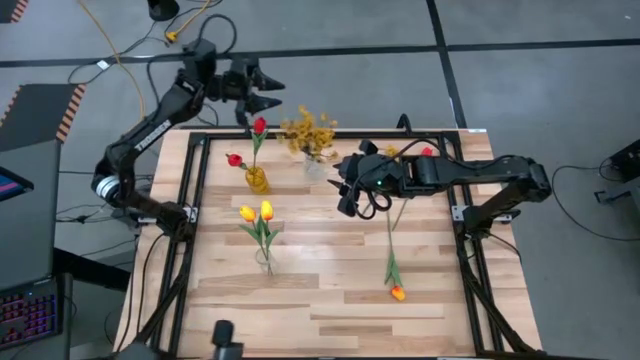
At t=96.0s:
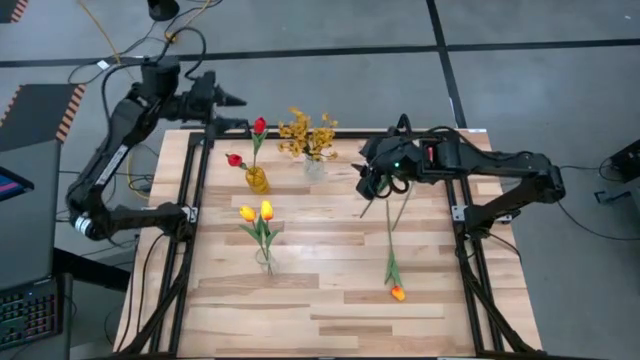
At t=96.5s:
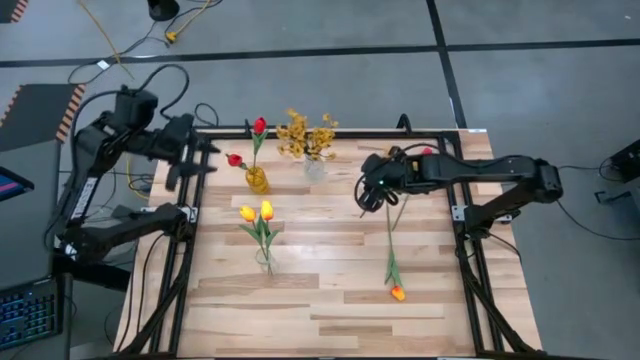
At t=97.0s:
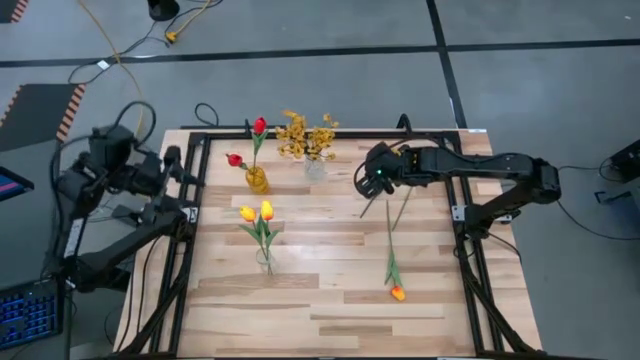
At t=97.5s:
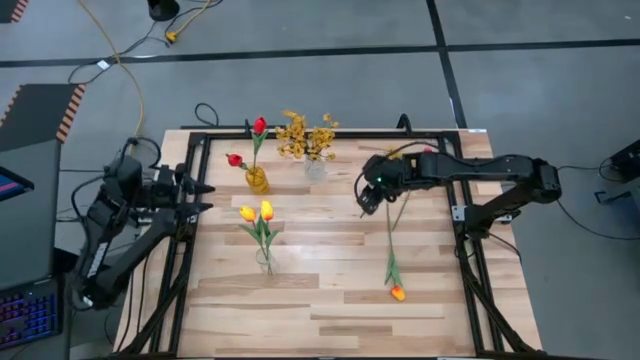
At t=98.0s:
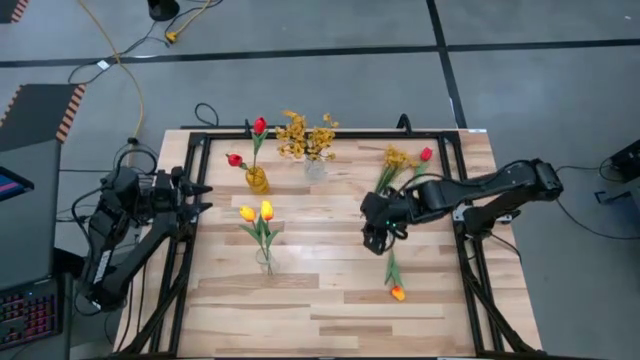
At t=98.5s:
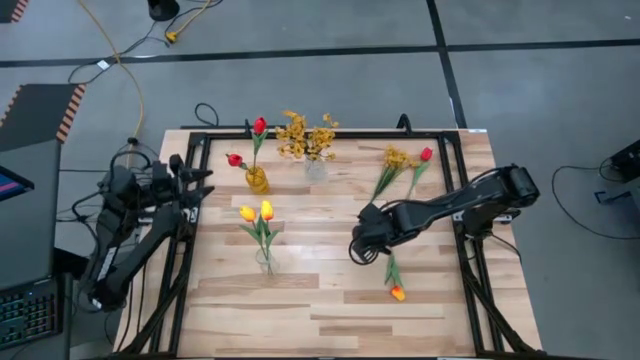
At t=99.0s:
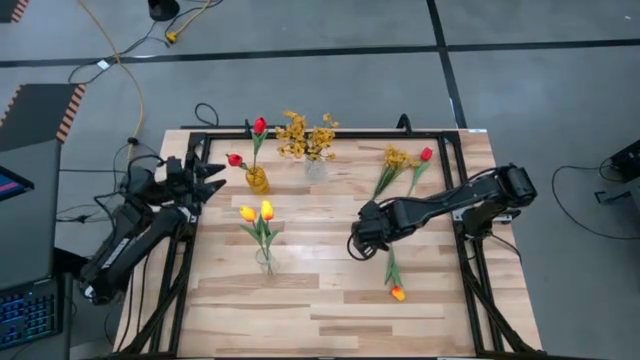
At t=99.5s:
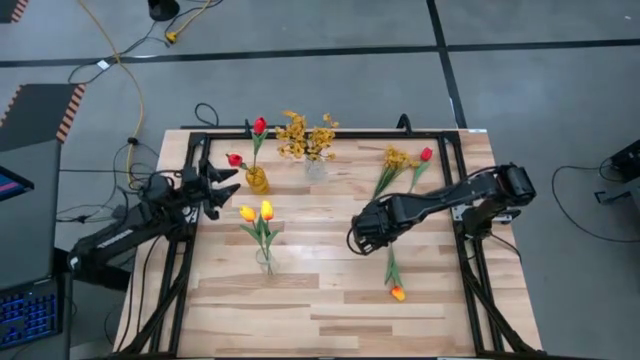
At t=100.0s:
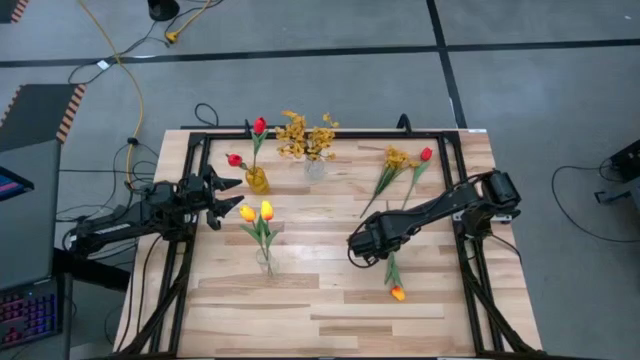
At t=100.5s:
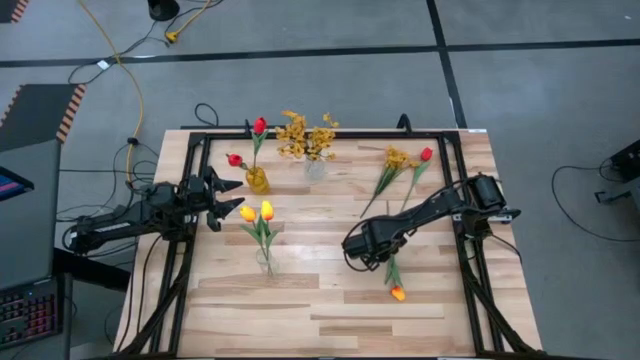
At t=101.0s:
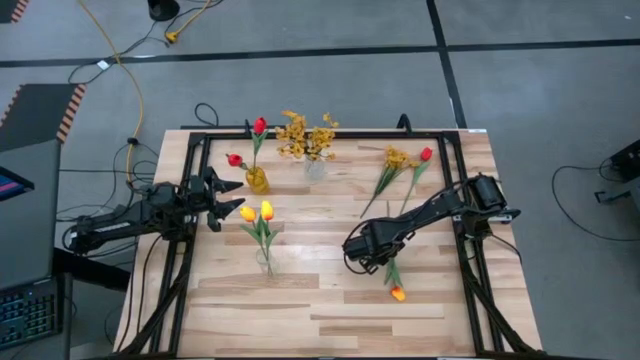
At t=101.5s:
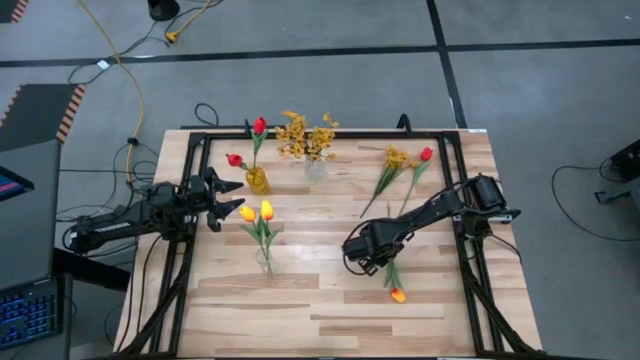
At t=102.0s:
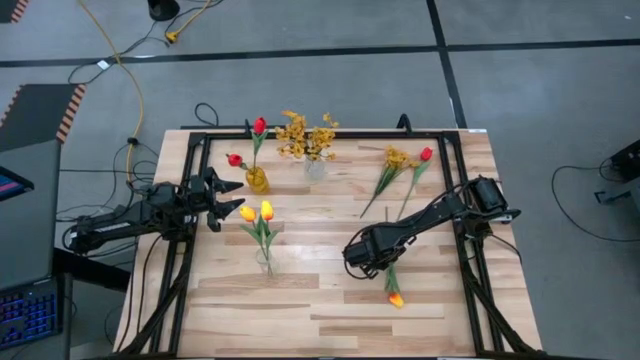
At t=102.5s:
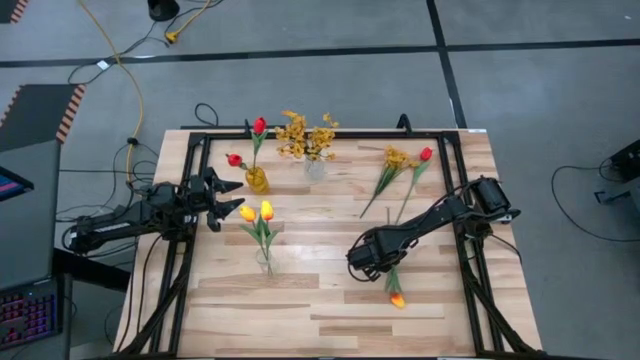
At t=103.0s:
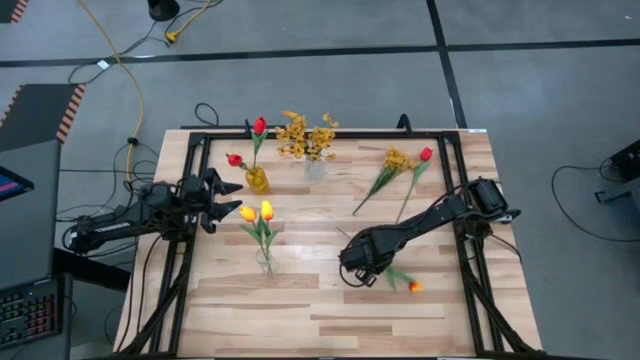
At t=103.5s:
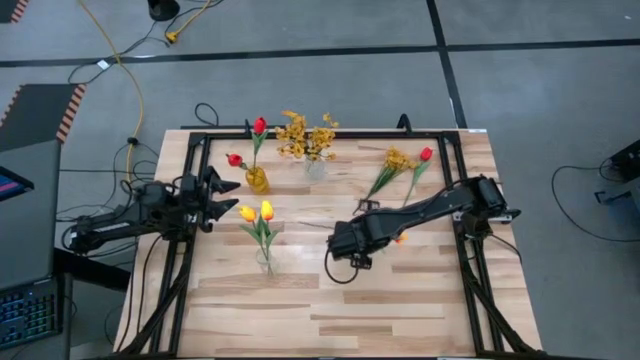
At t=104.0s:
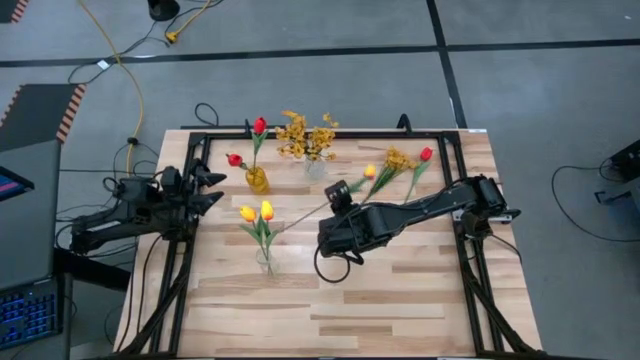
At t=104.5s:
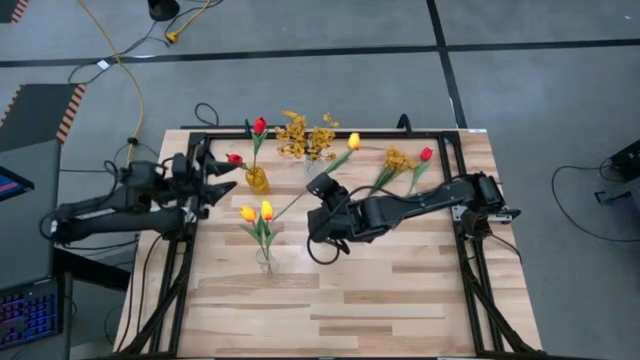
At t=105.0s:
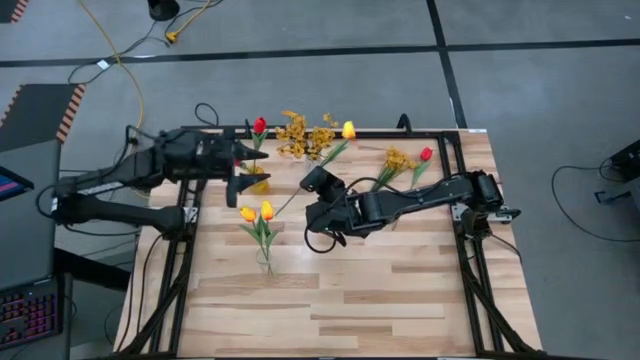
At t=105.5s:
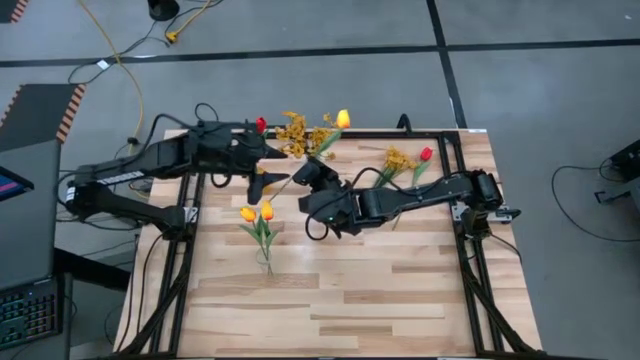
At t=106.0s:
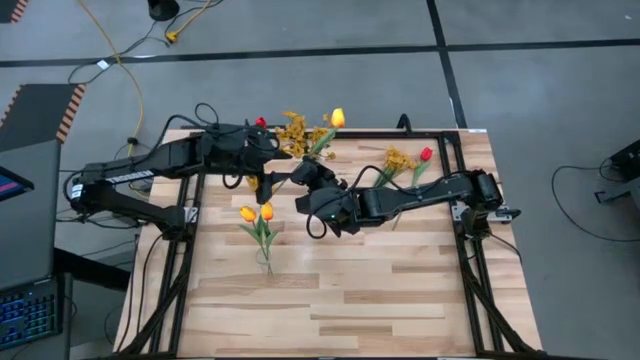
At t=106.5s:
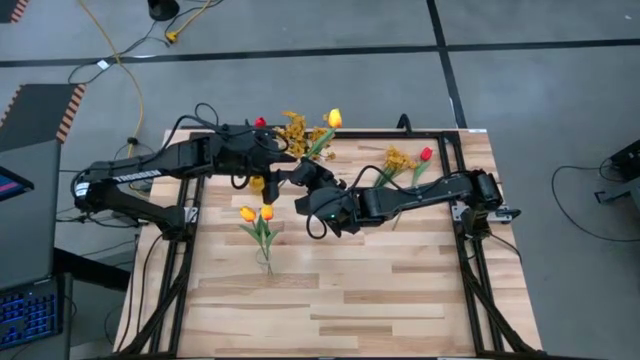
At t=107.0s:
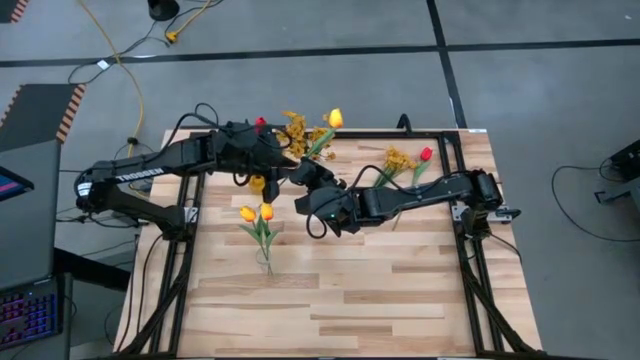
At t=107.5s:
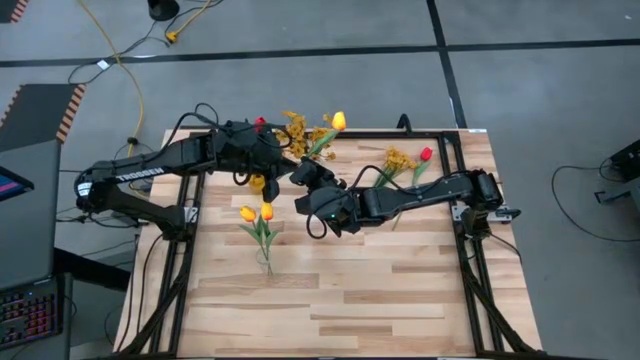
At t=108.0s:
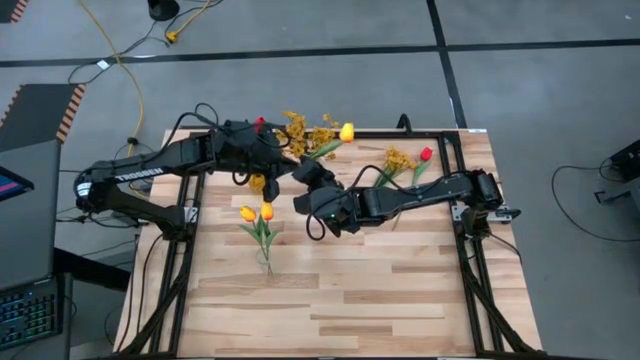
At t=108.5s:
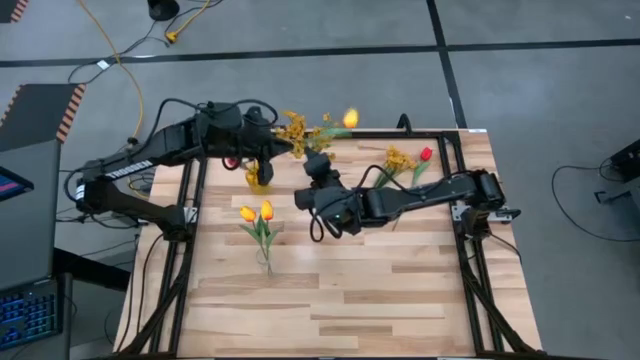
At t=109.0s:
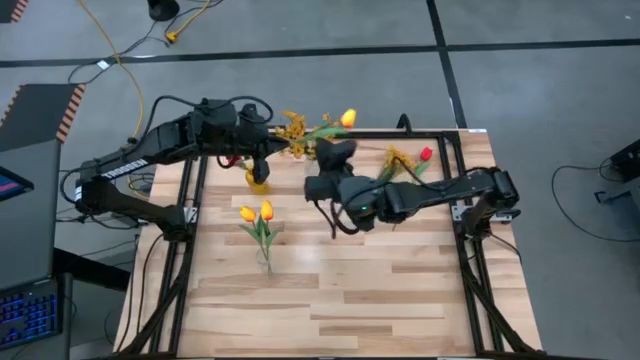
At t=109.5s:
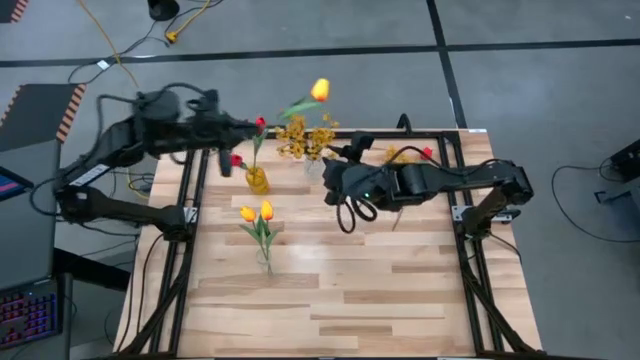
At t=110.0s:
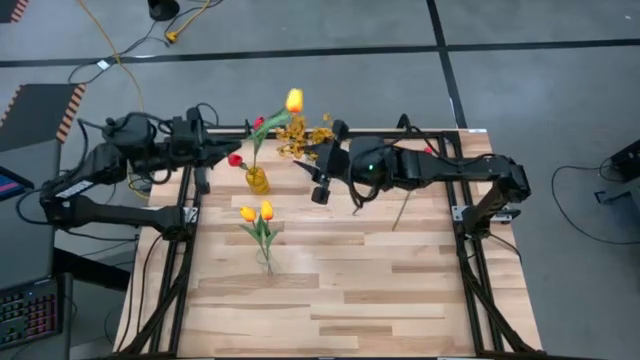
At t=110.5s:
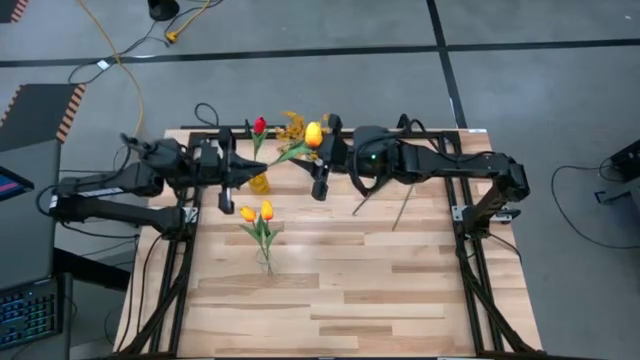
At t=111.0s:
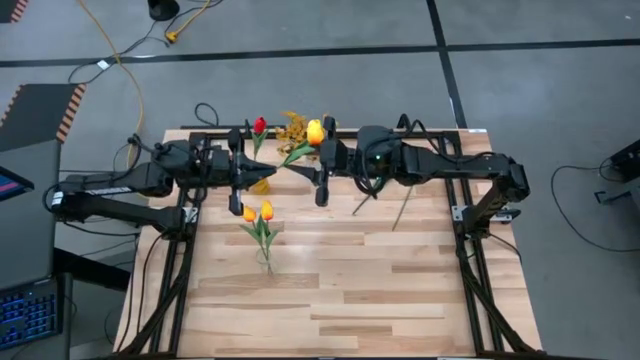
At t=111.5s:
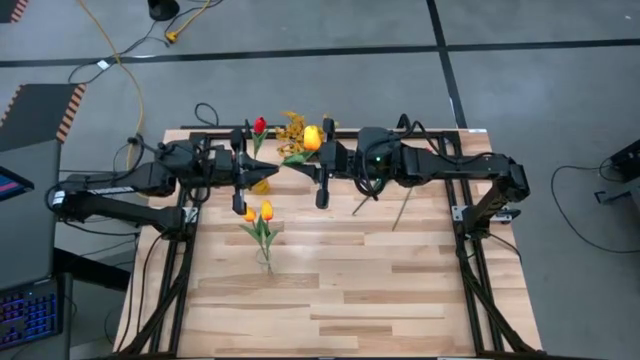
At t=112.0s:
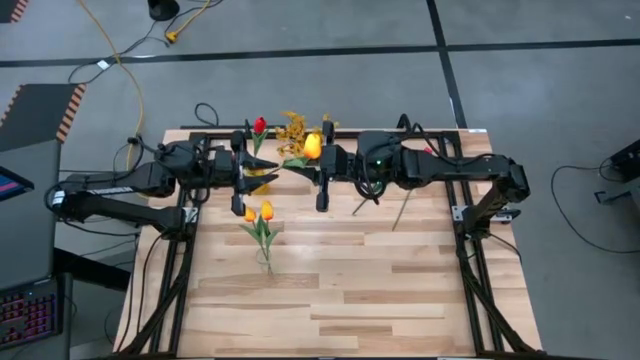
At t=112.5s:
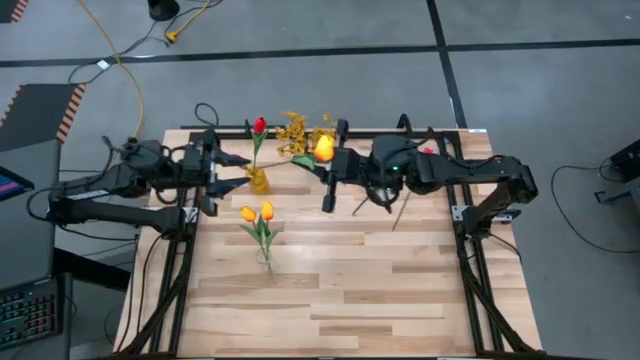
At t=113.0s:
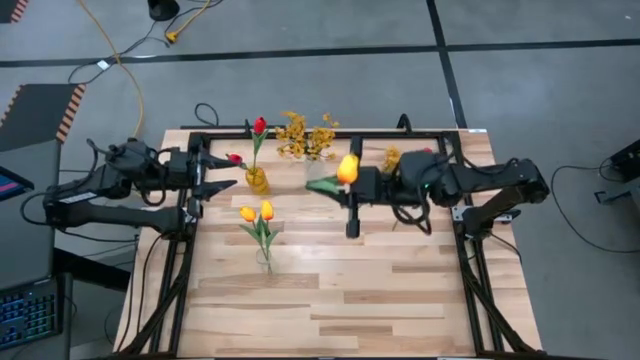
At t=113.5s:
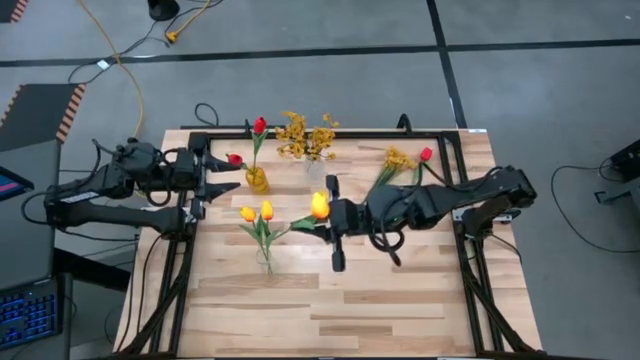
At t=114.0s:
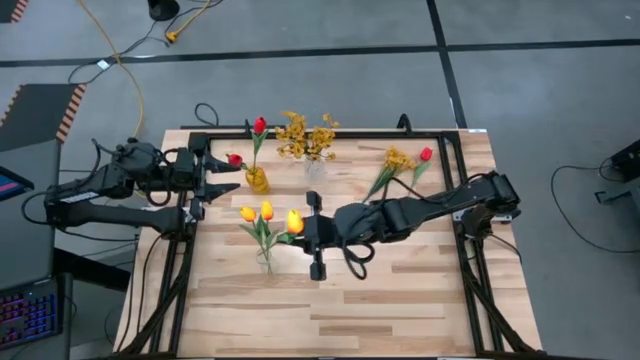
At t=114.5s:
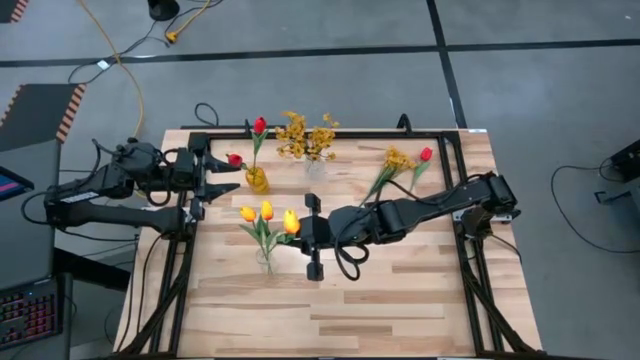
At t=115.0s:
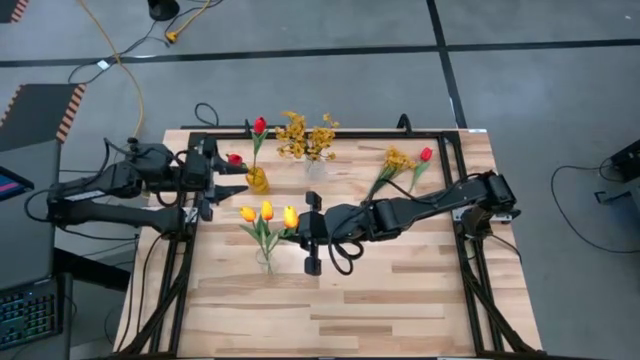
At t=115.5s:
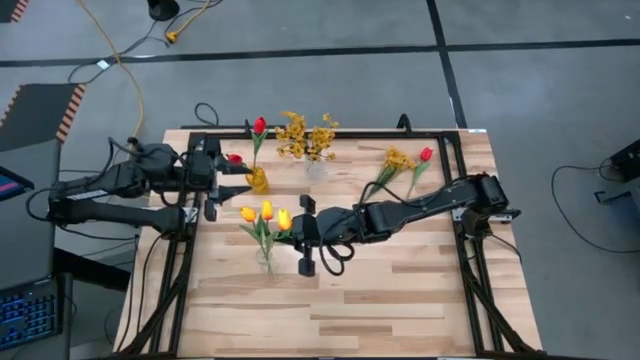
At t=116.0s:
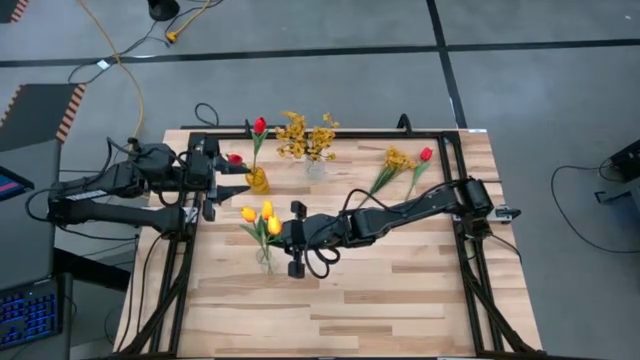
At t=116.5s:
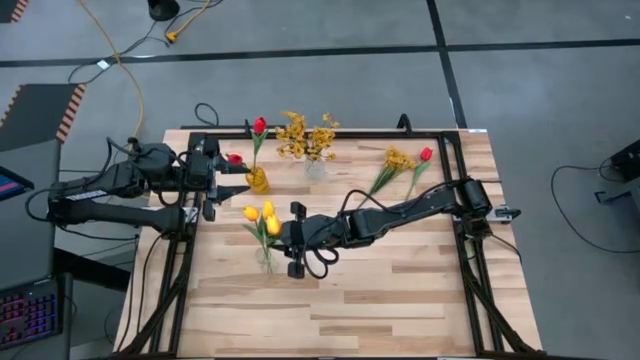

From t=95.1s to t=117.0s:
Task: Sort flowers into vase by color
Put the yellow flower into the bottom transparent vase

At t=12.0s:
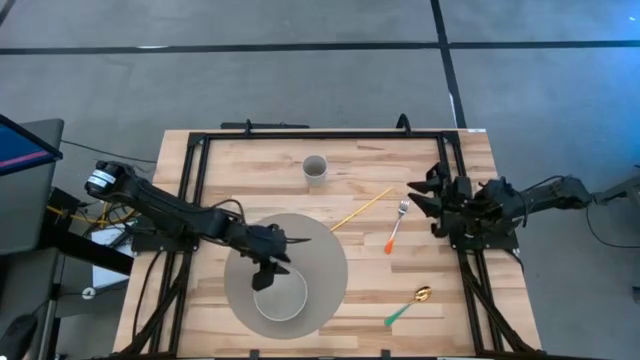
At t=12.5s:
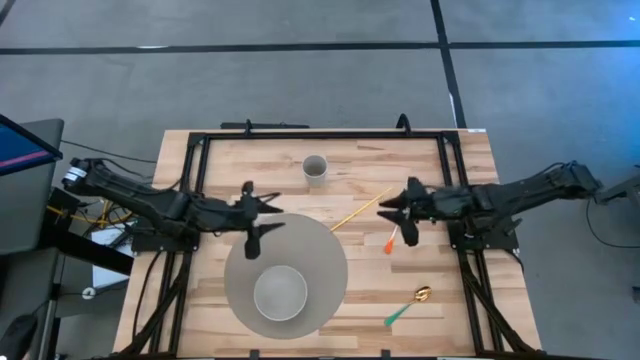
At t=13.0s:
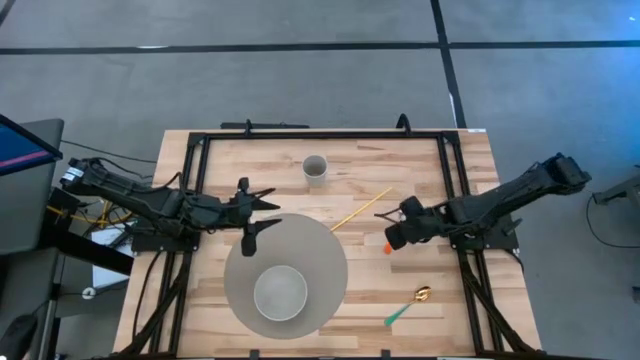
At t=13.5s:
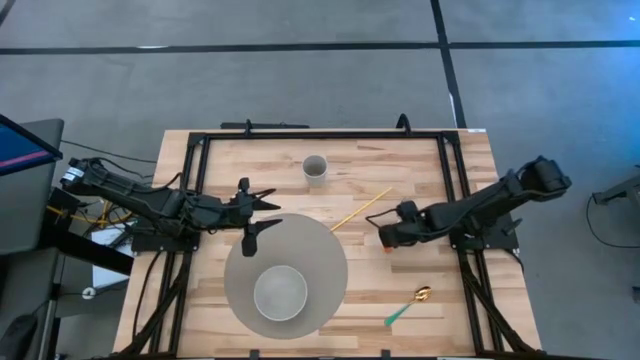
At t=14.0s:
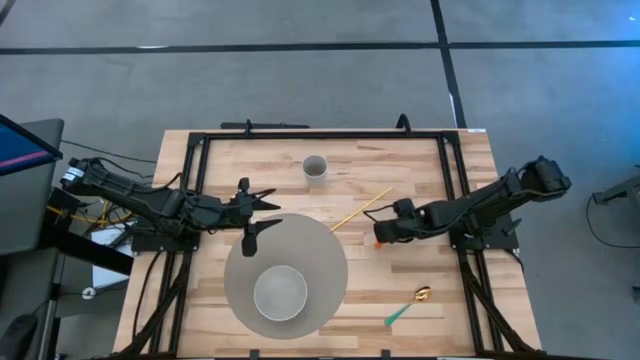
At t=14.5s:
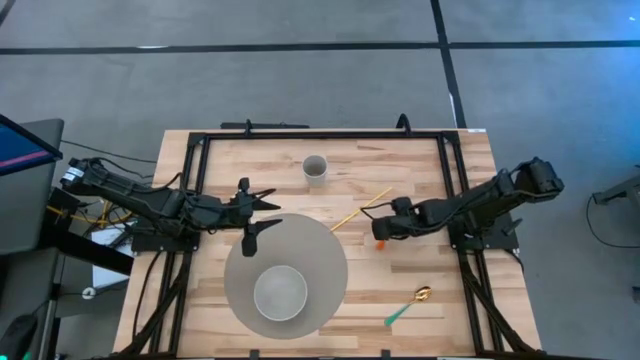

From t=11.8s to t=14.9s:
Task: Pick & Place Utensil
Put the orange fork into the white bowl on the mat
